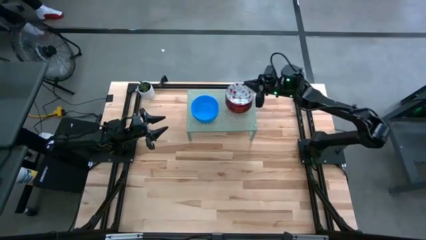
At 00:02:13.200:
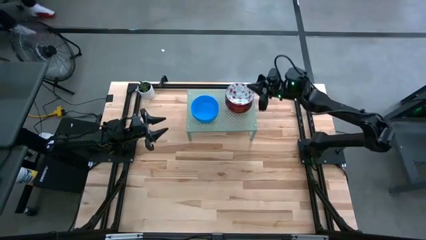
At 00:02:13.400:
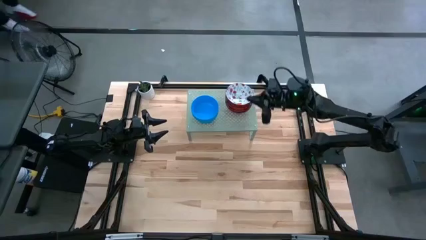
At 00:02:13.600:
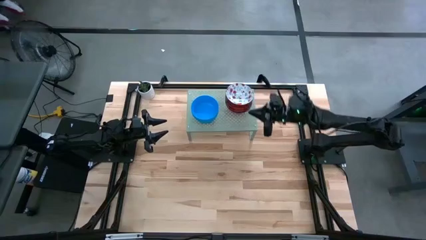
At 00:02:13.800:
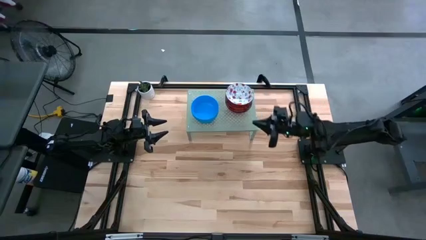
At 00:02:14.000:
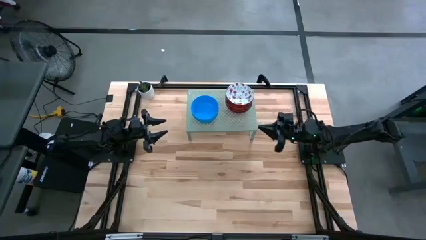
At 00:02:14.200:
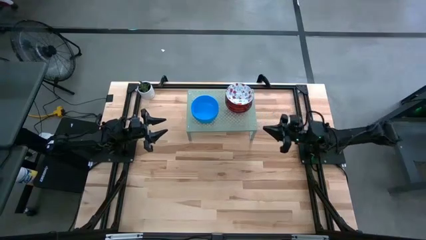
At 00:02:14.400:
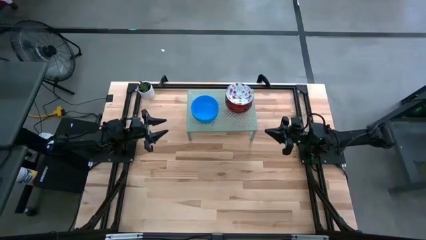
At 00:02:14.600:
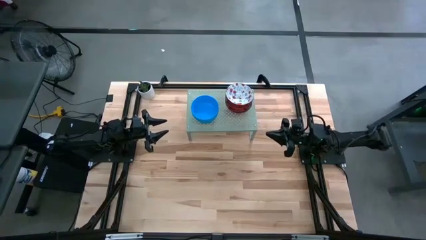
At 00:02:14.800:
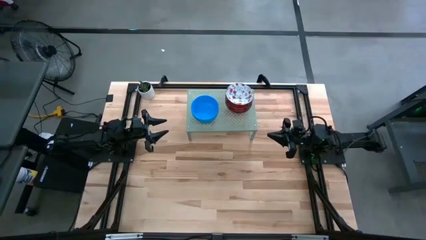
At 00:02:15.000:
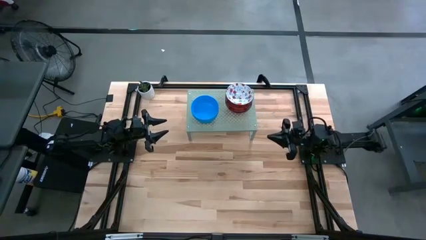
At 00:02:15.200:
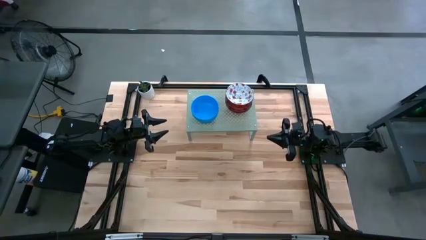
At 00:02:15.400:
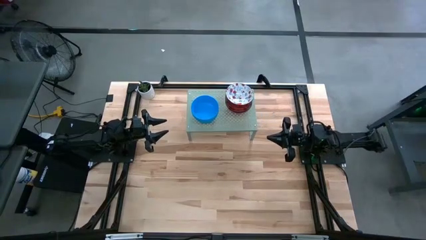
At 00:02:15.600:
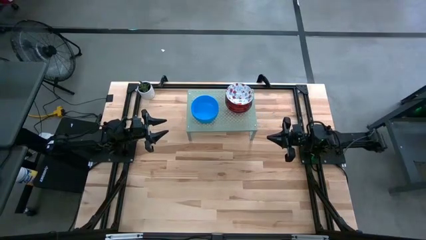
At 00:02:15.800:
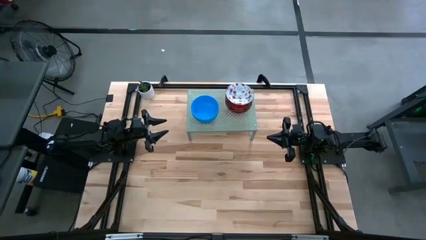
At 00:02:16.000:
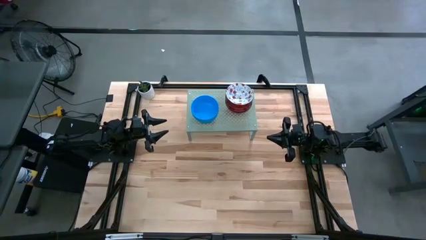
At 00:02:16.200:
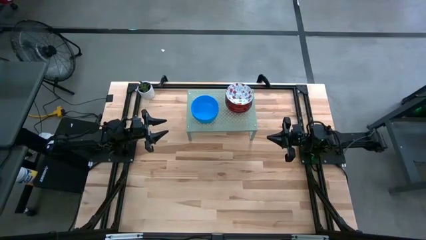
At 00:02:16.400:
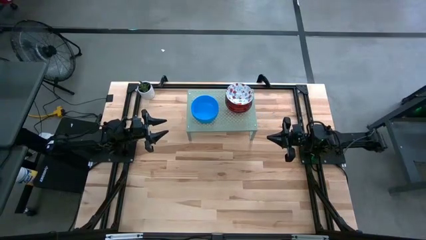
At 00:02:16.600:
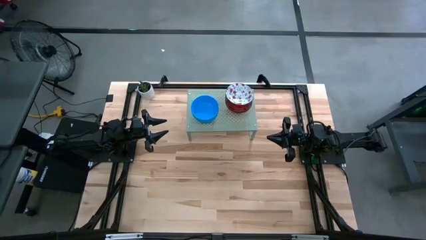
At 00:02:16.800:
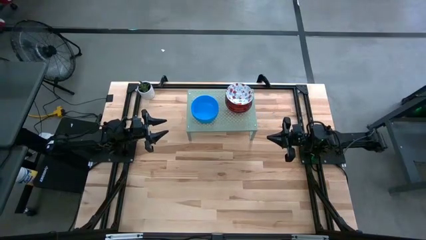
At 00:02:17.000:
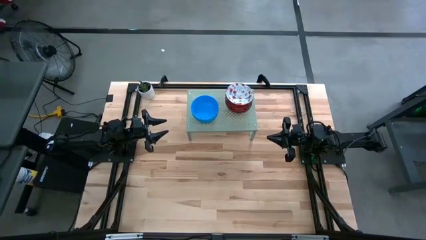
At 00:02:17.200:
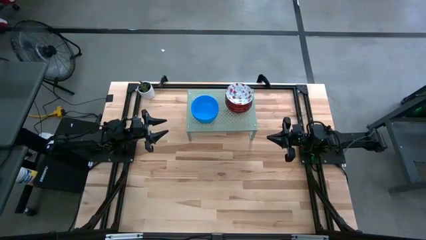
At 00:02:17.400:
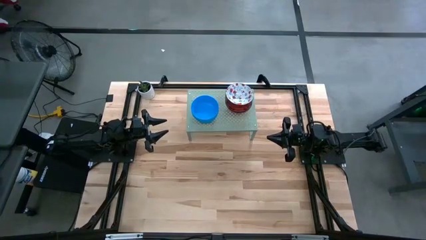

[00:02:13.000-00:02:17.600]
Task: Pick & Place Mini bowls
Return to Home Position

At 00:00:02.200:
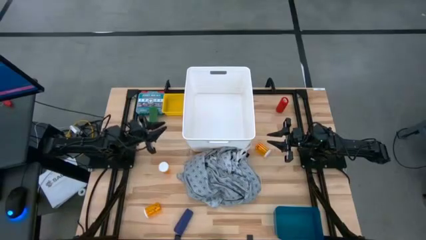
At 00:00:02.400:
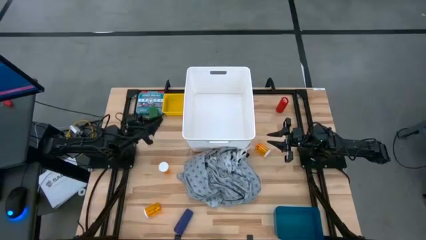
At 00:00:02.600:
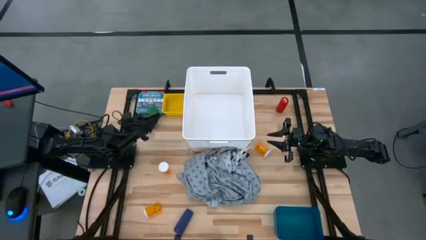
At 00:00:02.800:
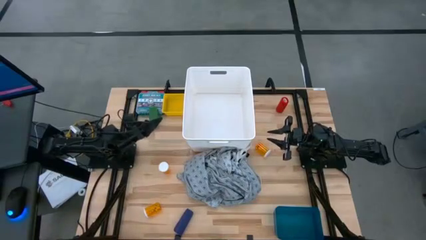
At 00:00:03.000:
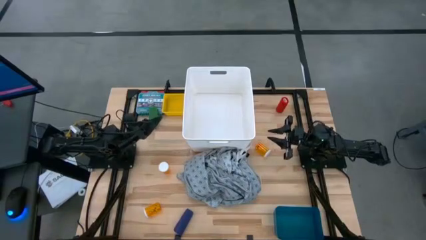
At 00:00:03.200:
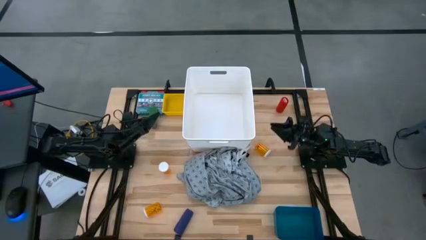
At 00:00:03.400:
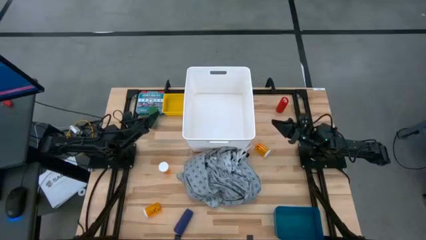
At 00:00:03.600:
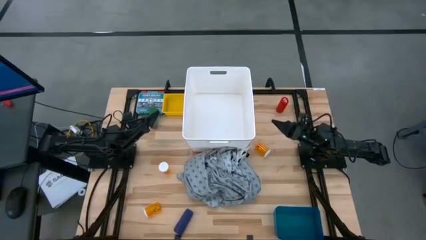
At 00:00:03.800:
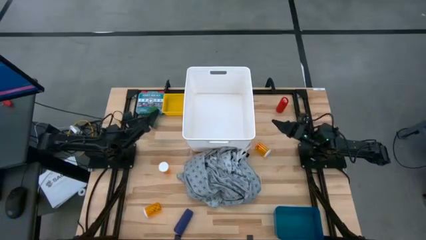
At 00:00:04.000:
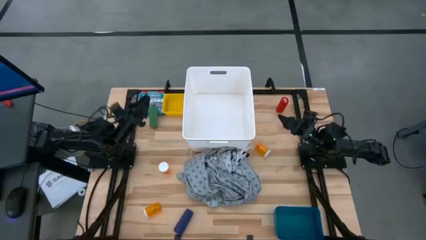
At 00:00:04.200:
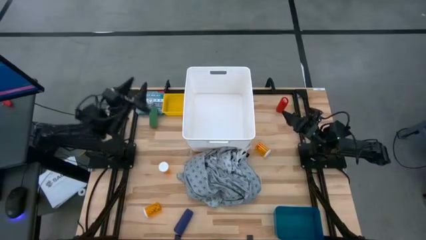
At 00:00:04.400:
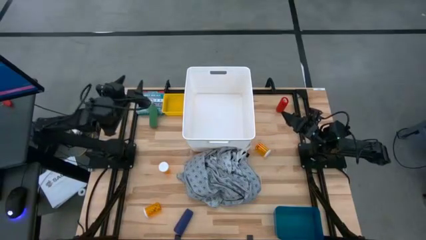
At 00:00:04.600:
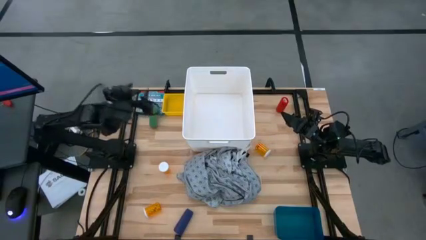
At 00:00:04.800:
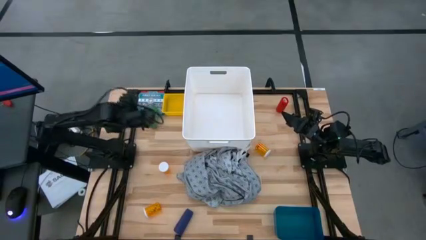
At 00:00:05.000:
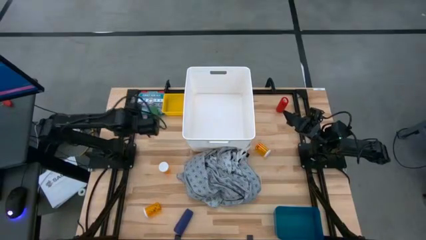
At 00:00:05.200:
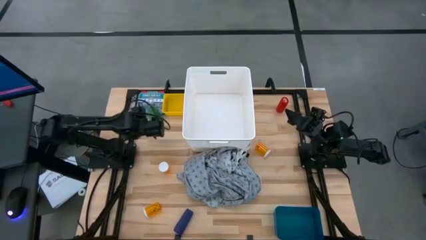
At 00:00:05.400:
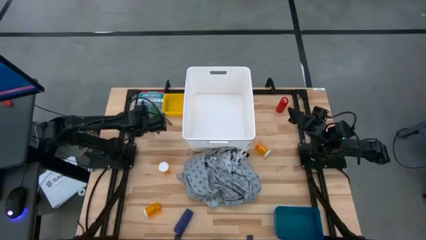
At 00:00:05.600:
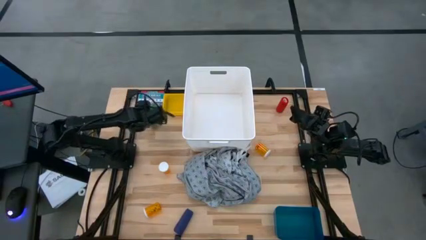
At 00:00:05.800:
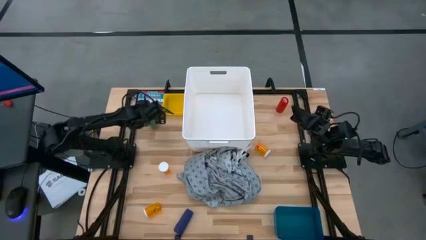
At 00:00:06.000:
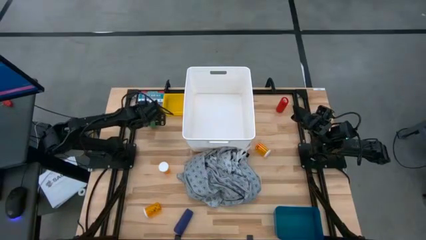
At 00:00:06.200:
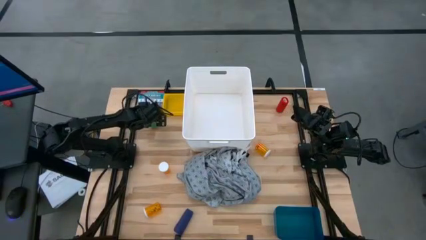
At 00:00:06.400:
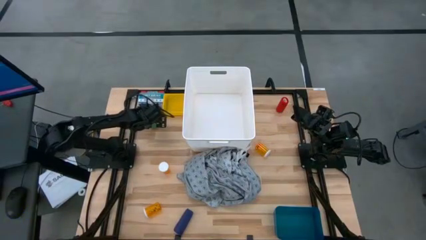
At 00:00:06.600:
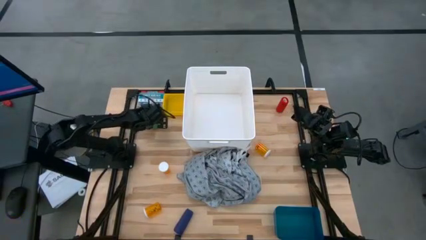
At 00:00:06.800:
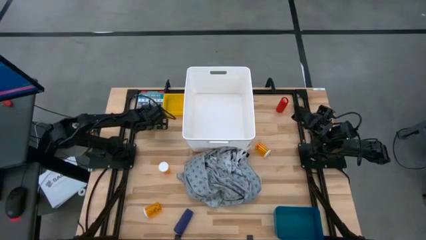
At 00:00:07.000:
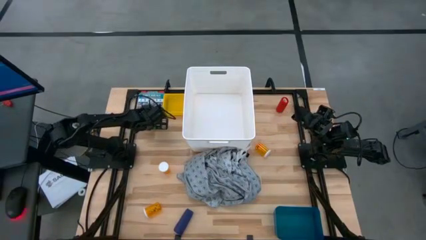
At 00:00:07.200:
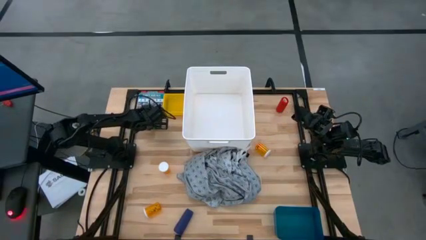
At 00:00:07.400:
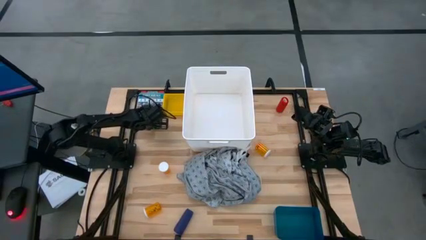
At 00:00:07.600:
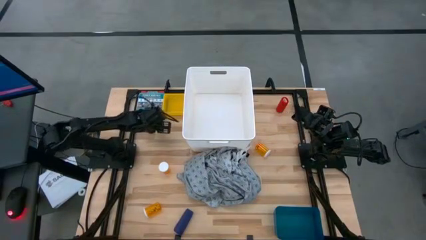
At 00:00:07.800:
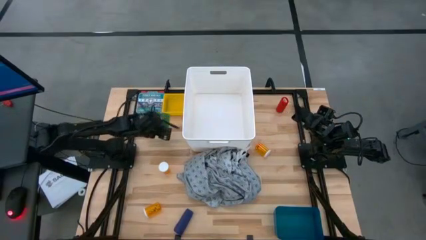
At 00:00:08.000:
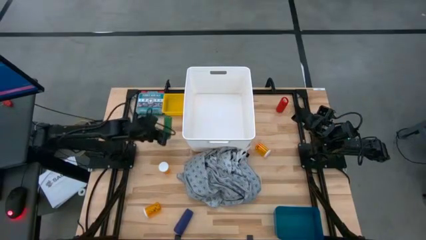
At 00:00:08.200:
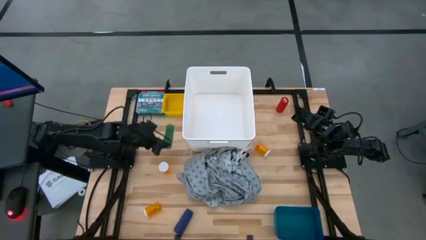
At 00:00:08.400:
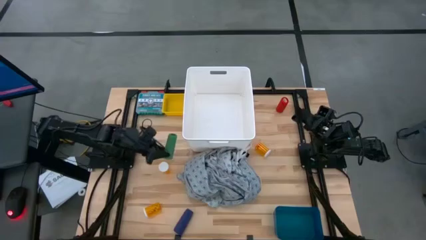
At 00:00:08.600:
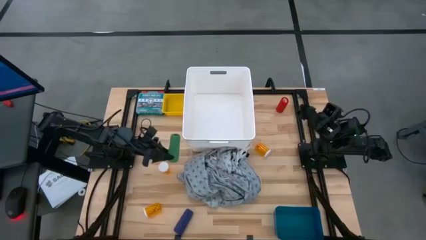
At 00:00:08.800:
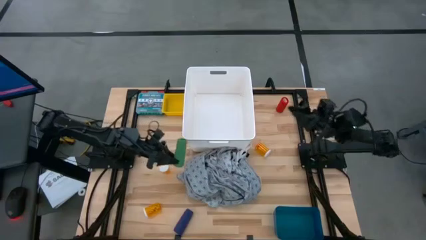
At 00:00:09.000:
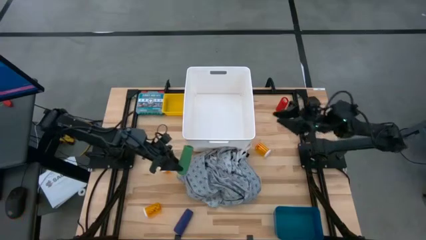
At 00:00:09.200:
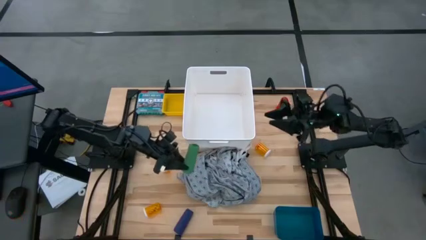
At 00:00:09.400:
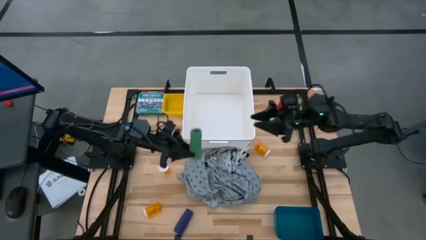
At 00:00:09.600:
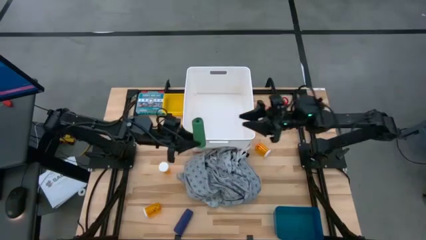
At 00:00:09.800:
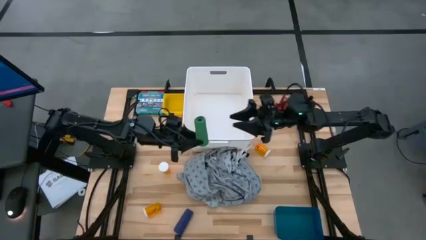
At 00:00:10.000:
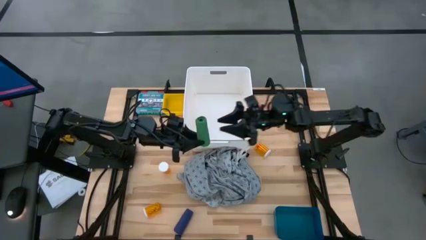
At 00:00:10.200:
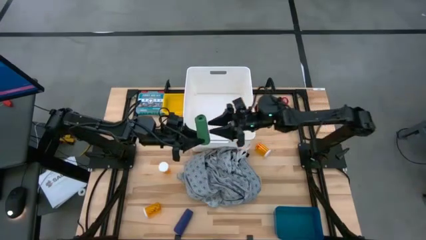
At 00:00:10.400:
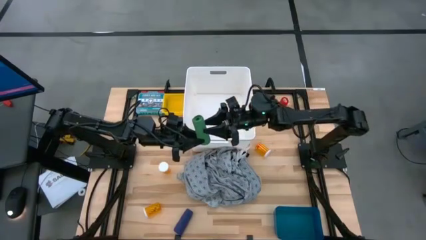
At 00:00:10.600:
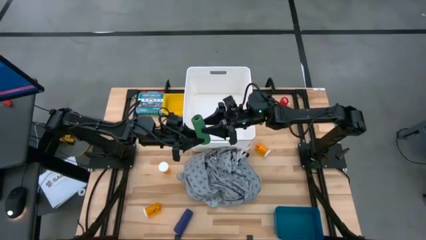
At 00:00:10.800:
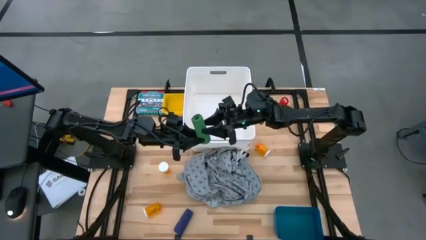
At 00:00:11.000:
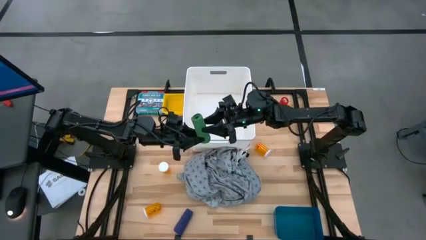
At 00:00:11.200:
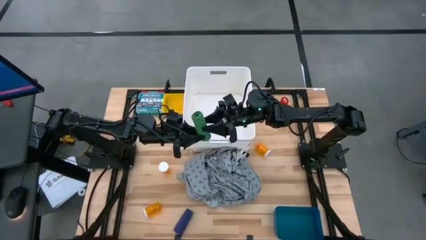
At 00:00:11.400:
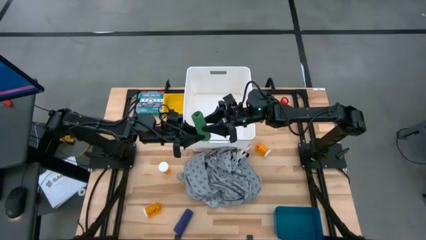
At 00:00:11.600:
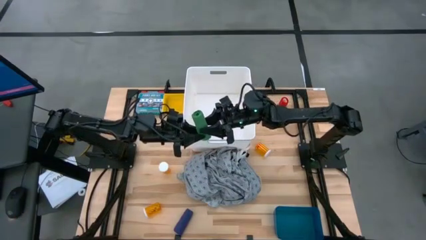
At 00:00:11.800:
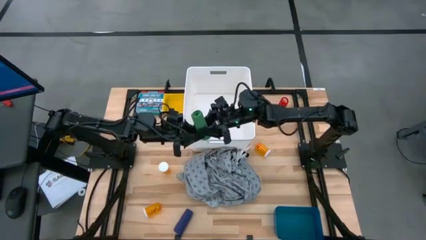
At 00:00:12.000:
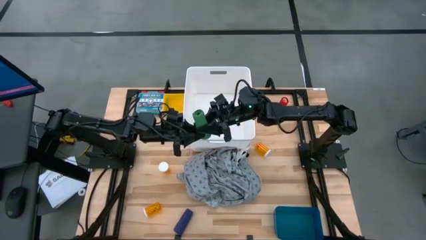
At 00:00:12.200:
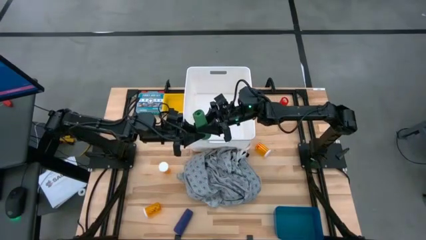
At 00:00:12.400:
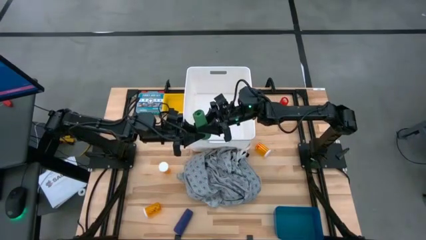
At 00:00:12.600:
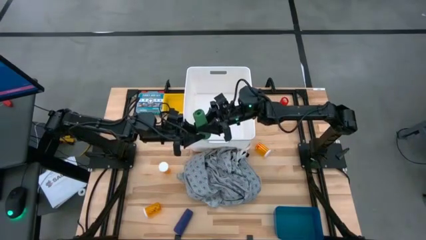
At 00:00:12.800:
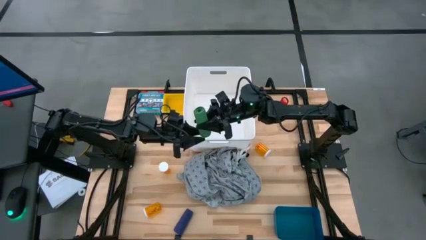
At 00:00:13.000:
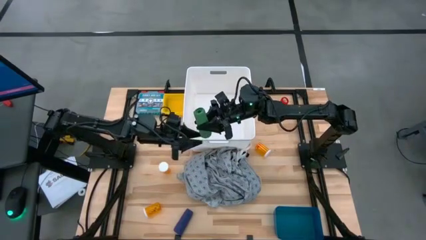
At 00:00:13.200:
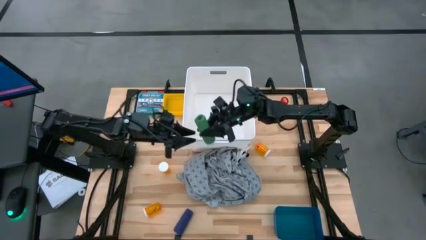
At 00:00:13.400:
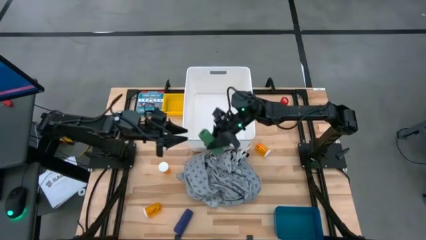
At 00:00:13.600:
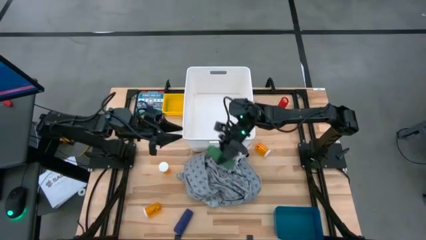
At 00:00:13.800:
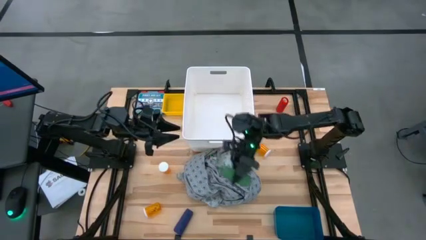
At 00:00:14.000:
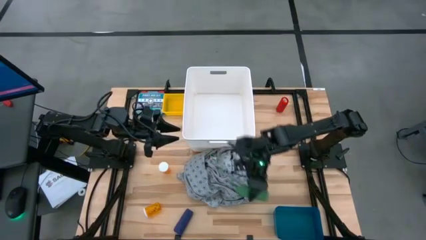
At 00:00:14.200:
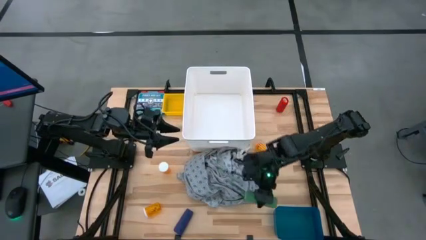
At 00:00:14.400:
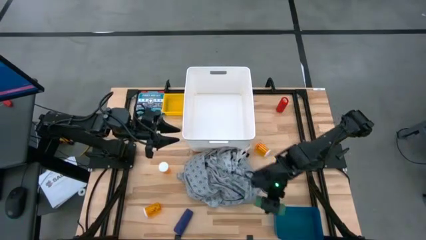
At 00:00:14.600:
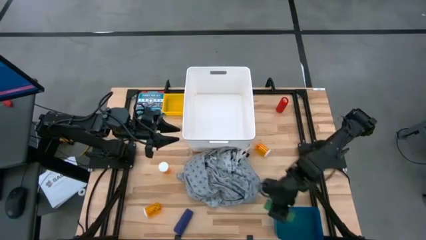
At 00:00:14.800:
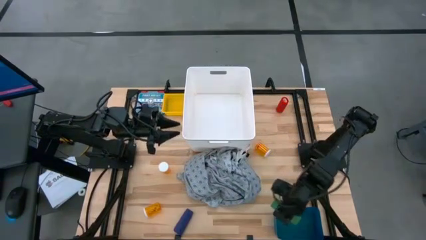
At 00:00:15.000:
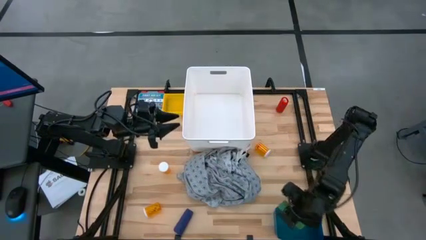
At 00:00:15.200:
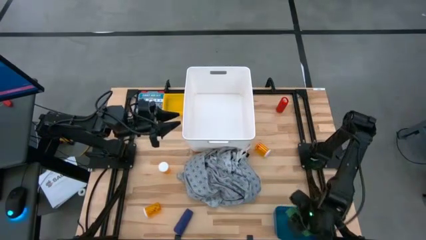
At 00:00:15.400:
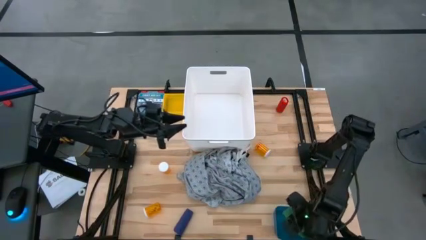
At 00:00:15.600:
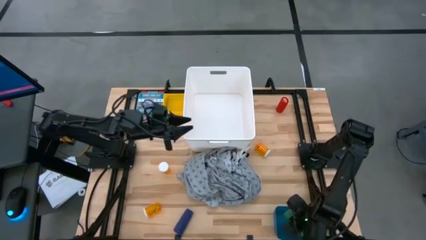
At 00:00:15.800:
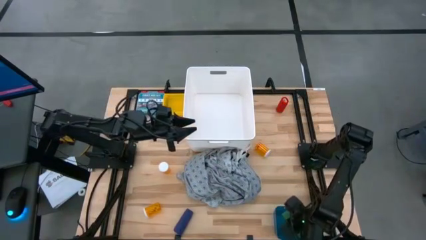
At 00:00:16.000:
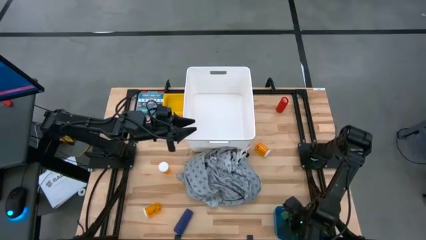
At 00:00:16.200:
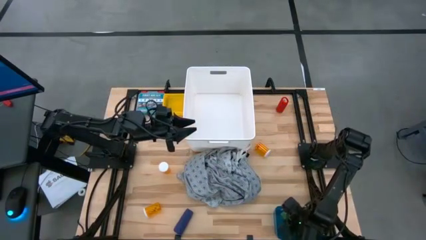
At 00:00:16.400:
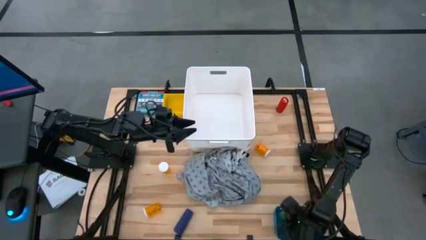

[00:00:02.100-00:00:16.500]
Task: Pick & place medical supplies in basket/bin
Put the green bandage into the blue bin
